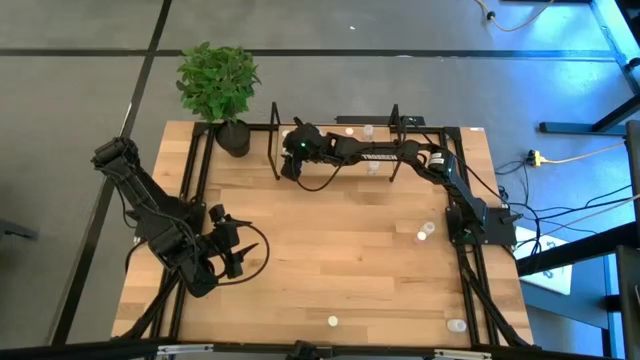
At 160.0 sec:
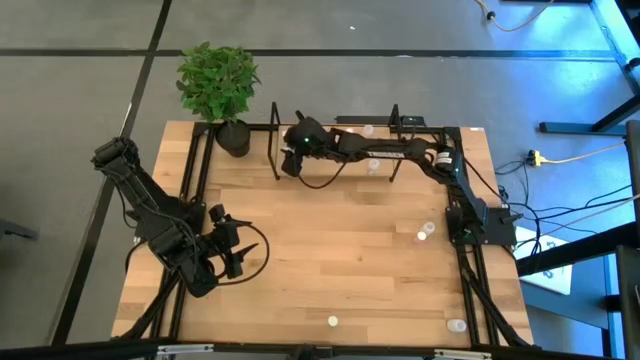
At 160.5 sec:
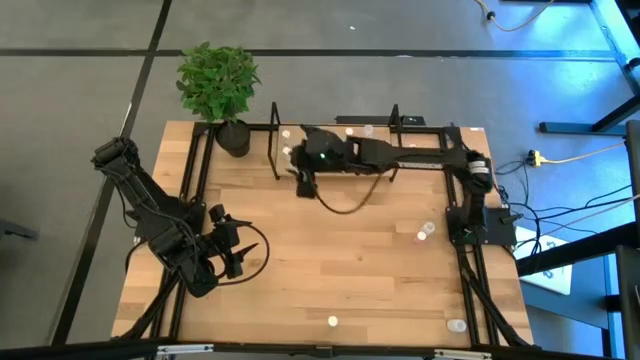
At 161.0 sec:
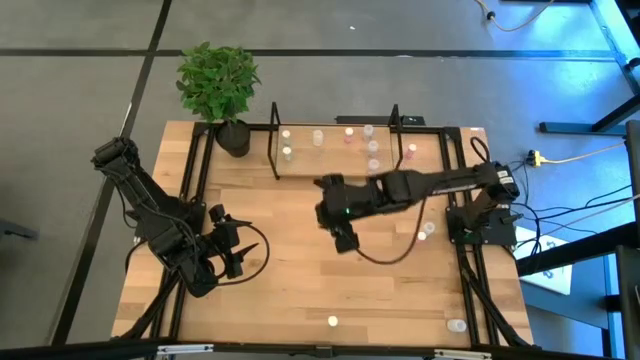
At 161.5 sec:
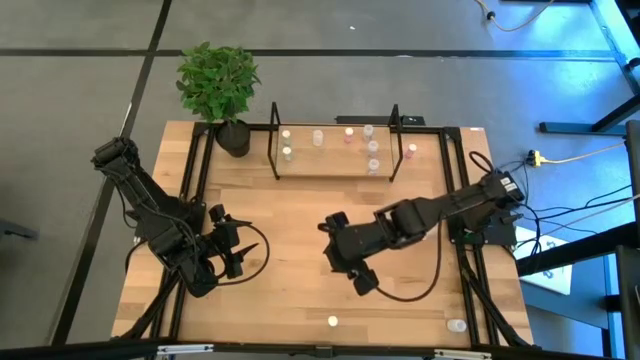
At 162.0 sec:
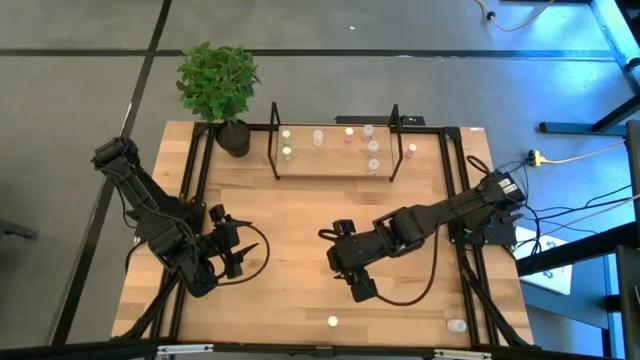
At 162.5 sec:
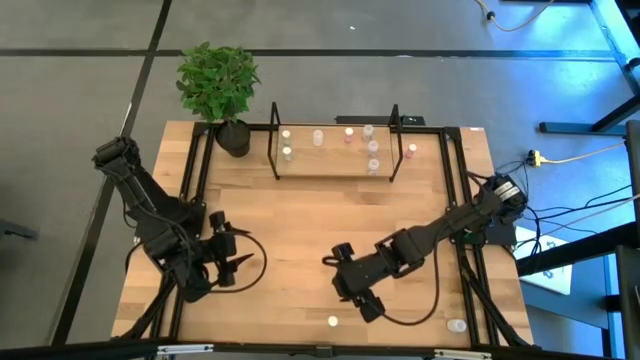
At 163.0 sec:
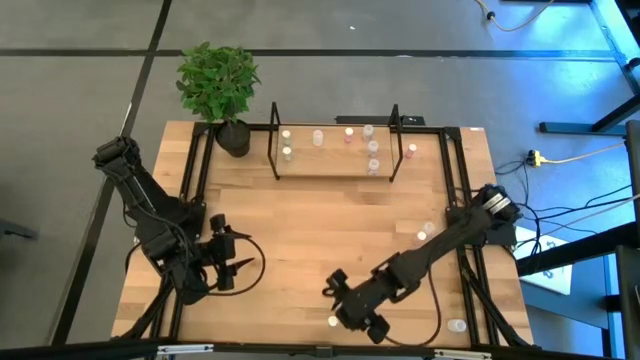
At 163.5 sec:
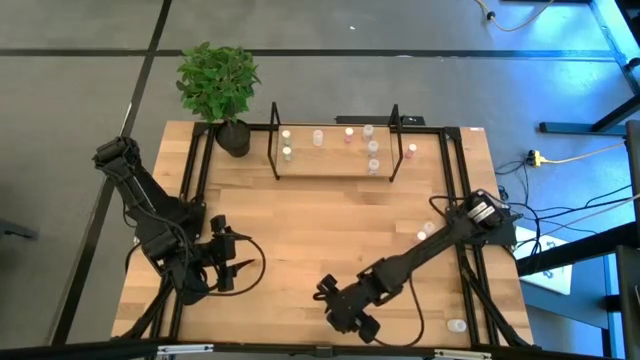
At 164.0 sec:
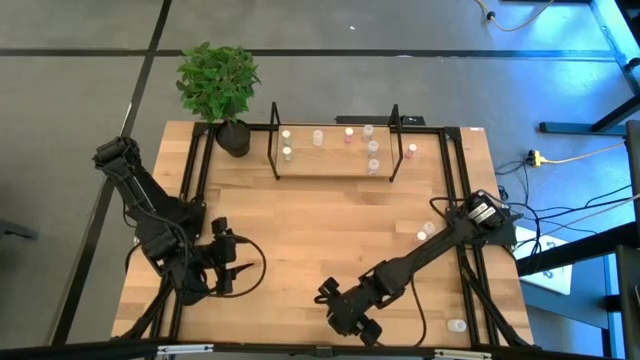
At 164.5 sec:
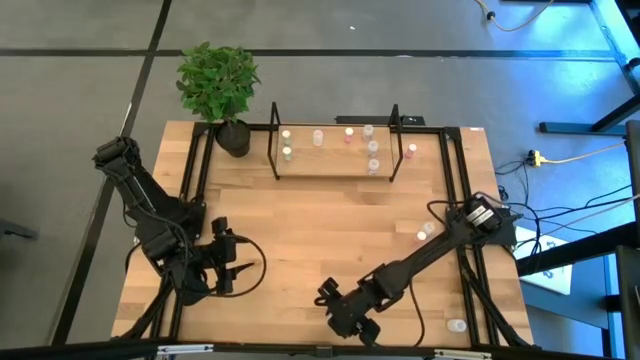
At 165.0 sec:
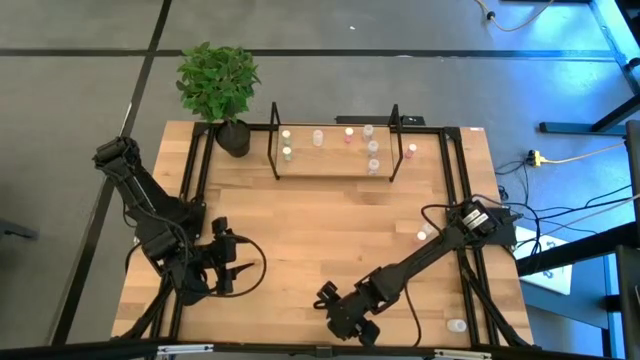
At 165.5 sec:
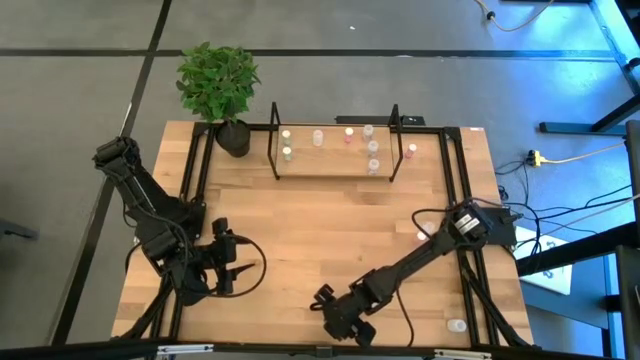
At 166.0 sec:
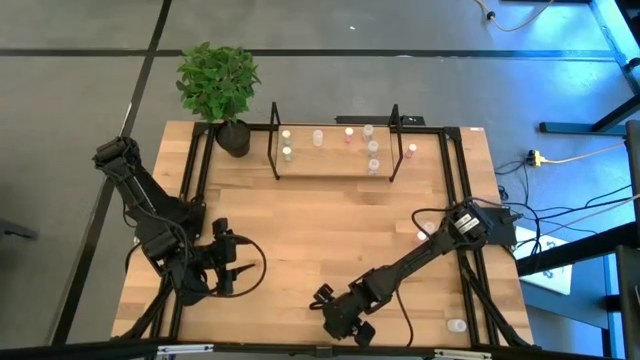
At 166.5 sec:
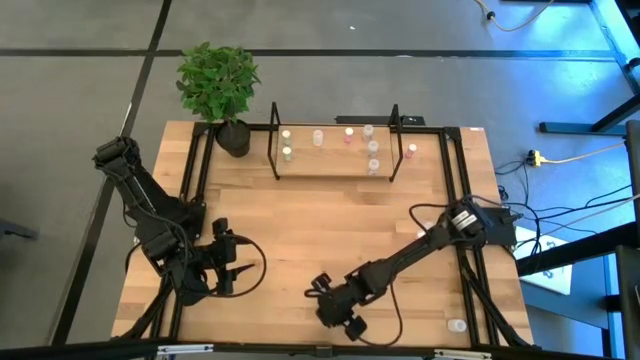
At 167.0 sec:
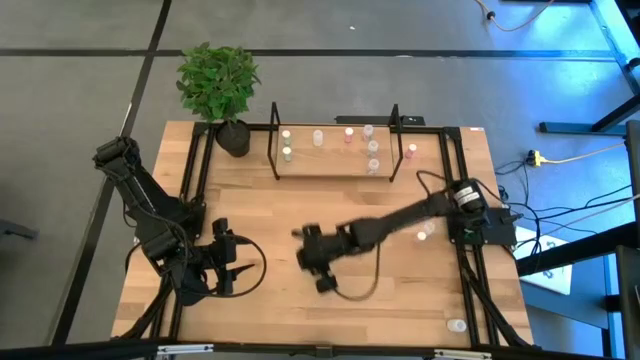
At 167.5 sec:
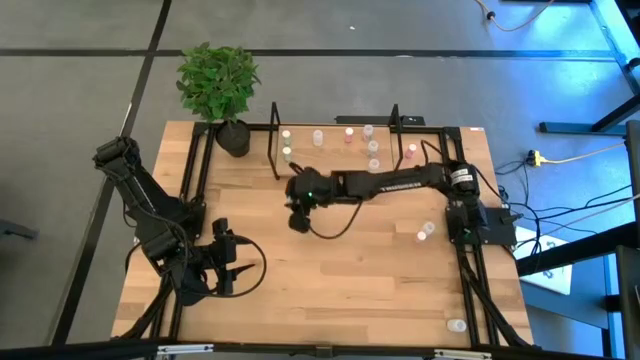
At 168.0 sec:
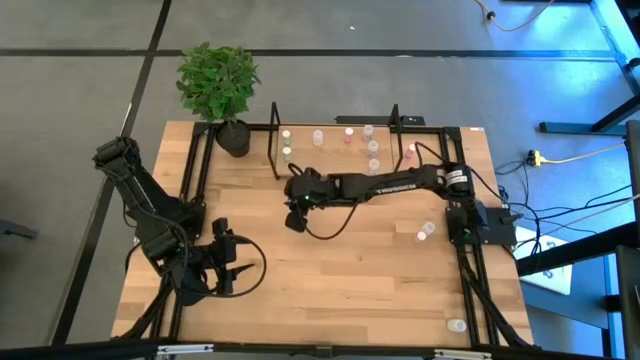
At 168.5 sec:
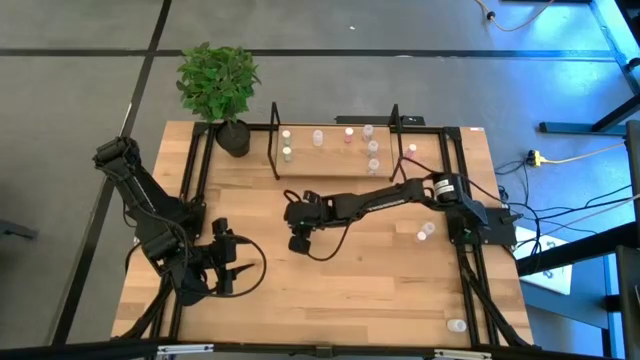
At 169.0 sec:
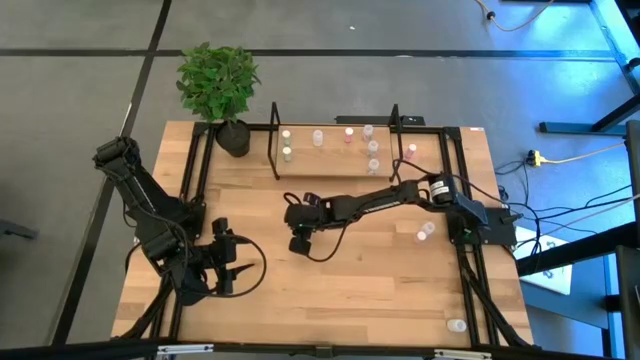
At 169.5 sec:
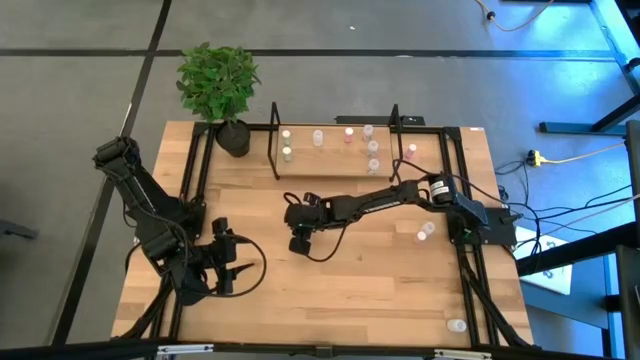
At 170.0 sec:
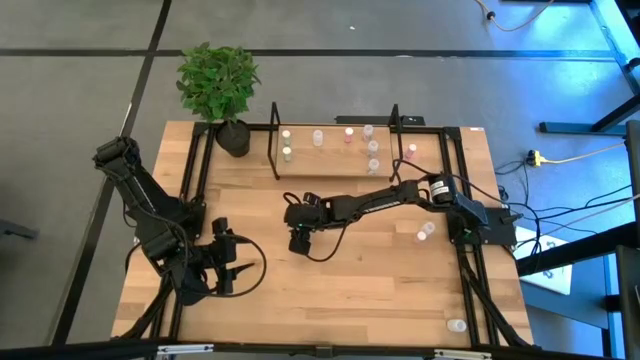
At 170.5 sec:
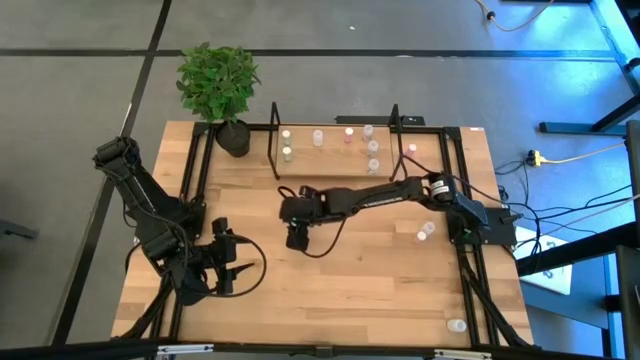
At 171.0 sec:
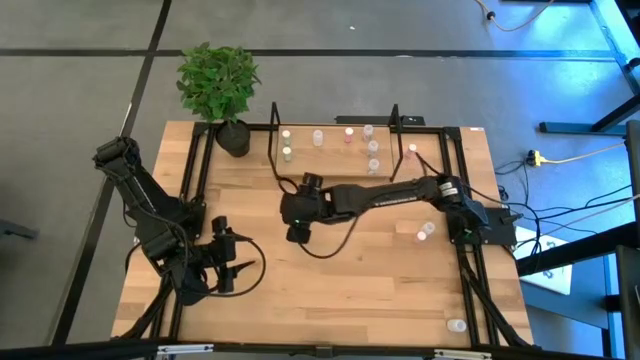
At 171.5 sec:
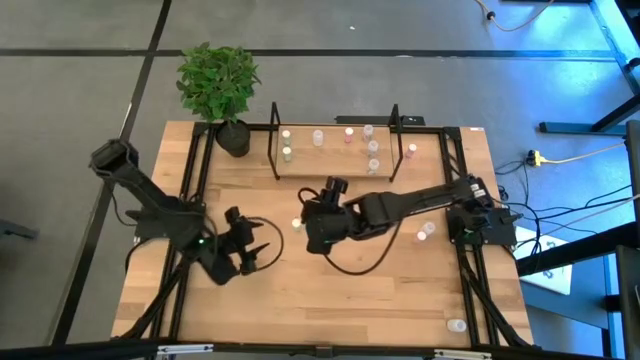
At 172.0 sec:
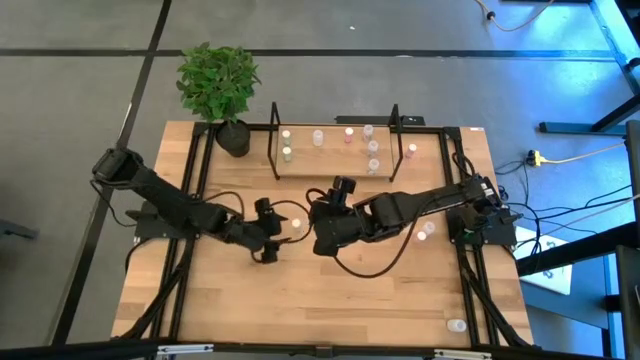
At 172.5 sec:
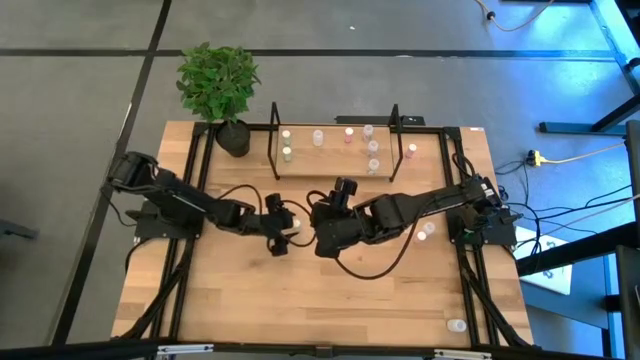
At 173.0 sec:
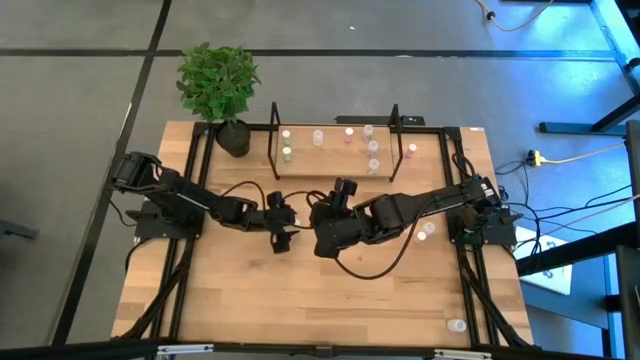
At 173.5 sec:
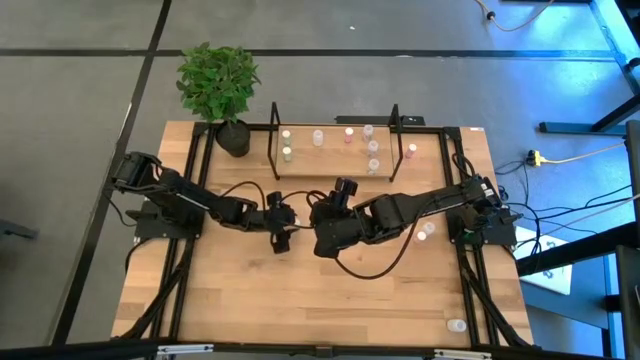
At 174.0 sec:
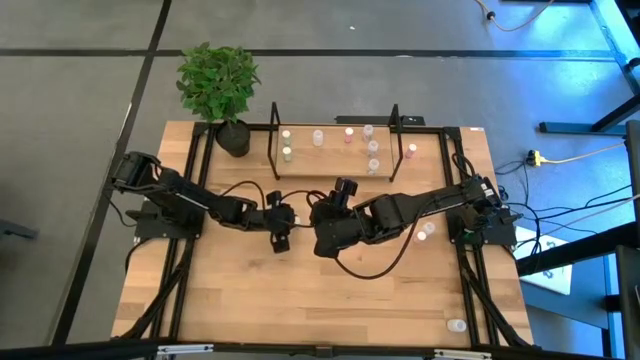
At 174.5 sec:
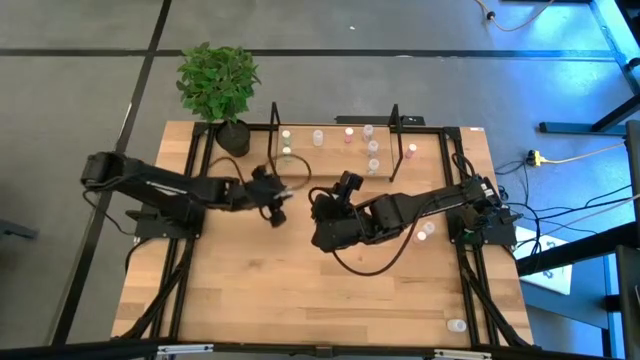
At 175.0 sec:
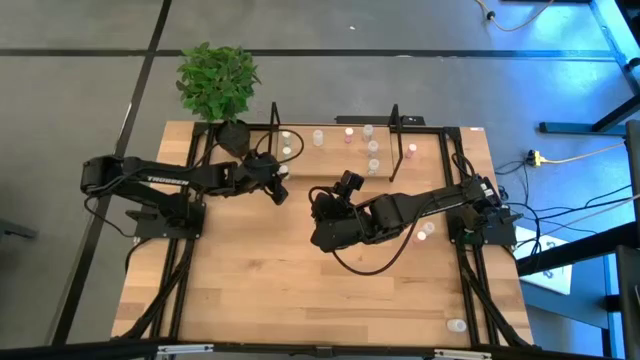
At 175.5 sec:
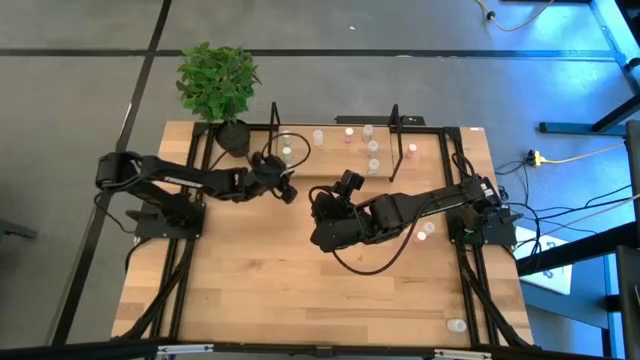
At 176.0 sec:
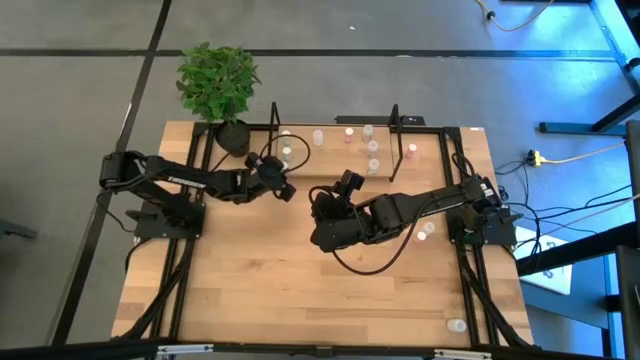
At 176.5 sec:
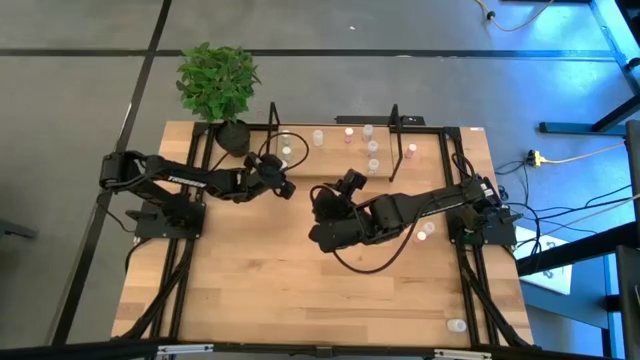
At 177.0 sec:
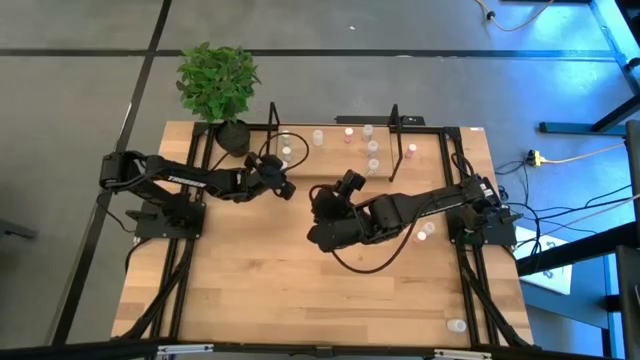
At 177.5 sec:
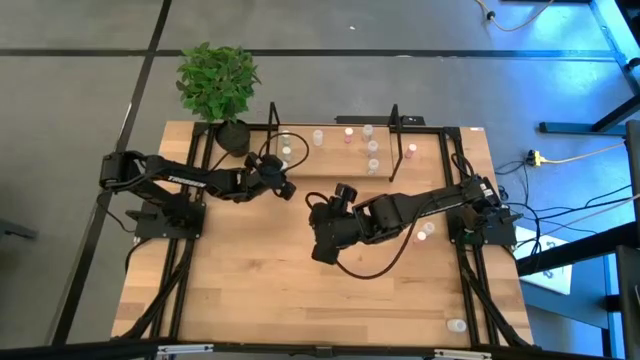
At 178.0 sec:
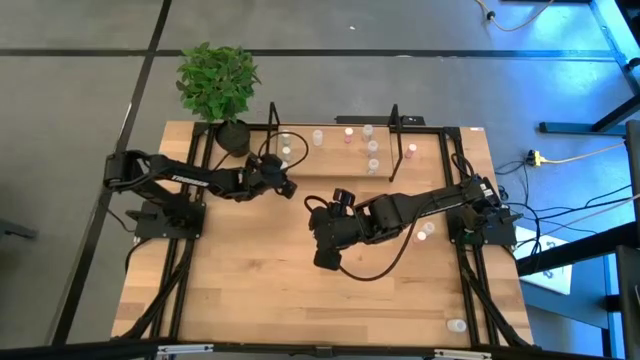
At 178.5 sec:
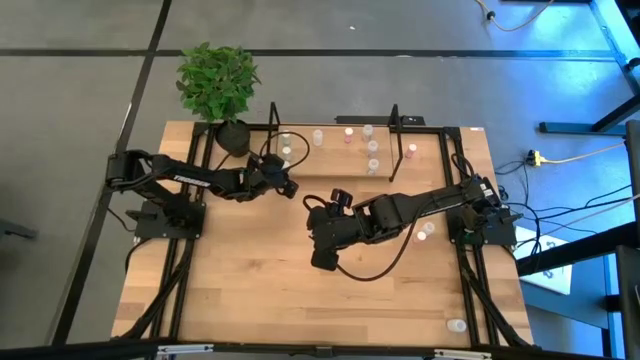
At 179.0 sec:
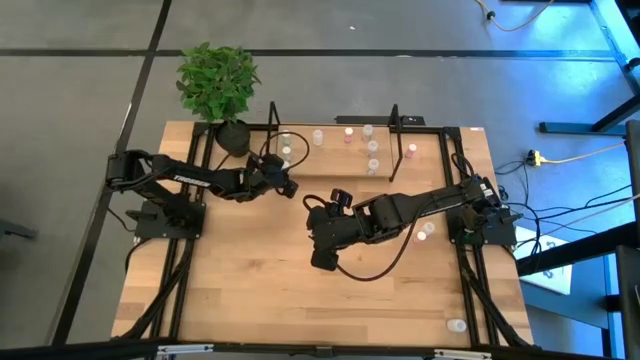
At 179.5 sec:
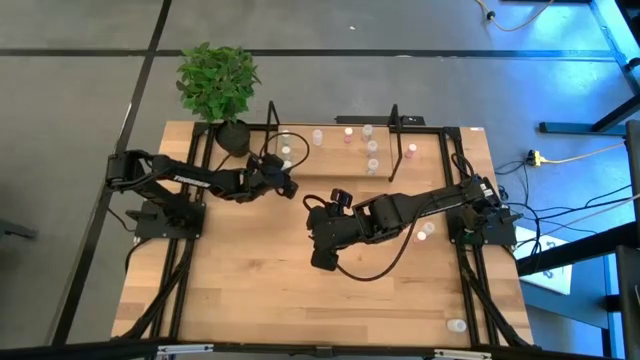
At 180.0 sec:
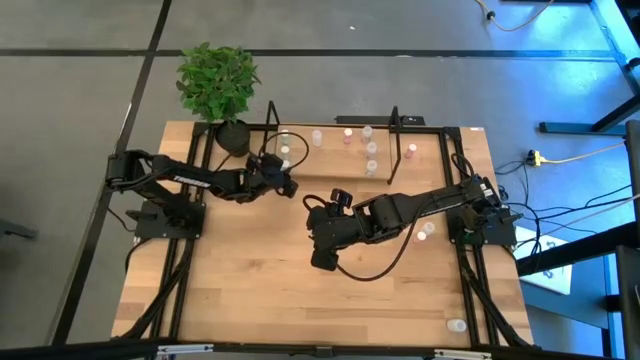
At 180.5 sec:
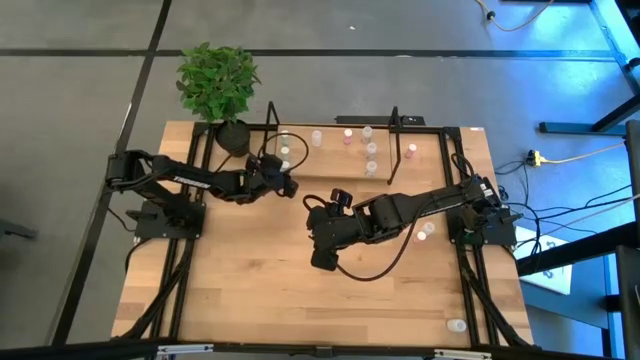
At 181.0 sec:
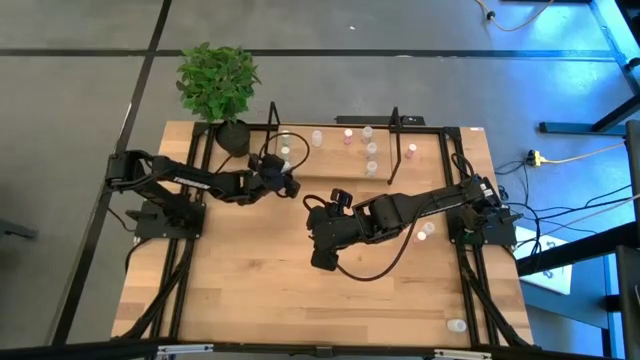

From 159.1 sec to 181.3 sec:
Task: Pick and place medicine bottles onto shelf by color
Put the blue medicine bottle on the shelf aligned with the other blue medicine bottle
